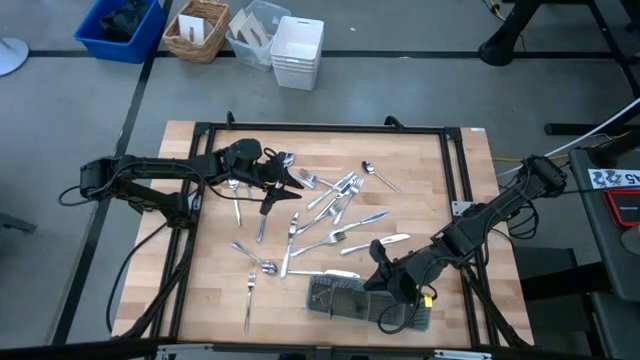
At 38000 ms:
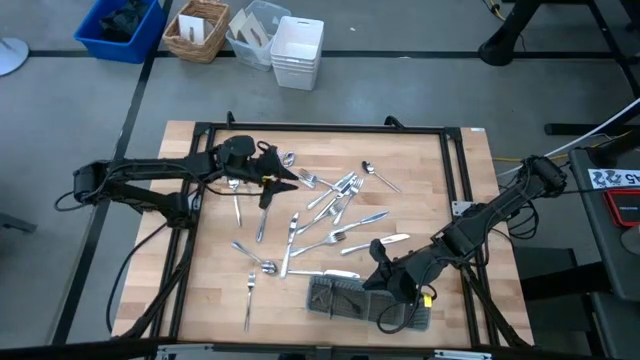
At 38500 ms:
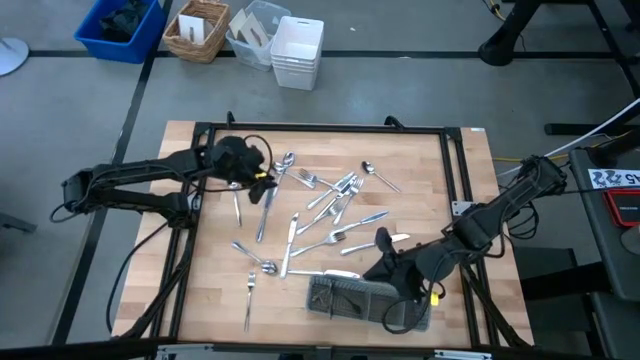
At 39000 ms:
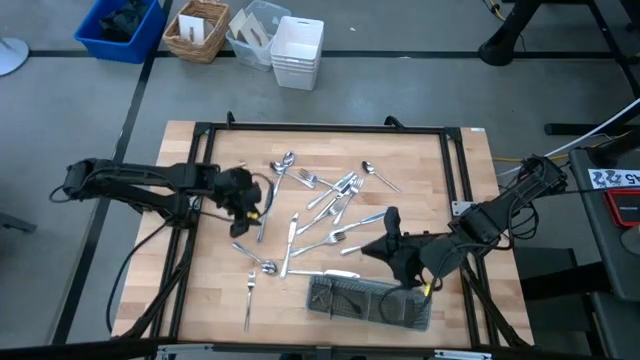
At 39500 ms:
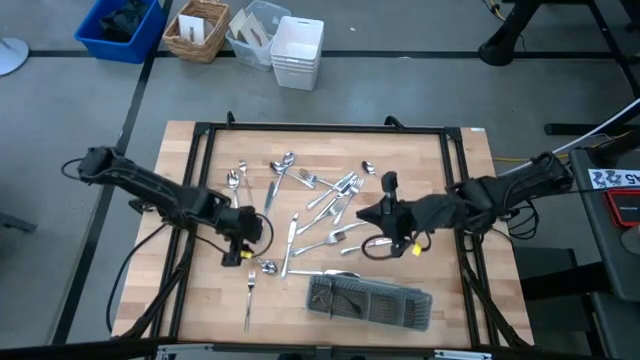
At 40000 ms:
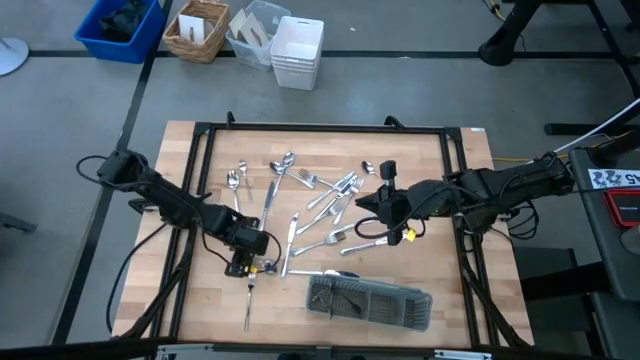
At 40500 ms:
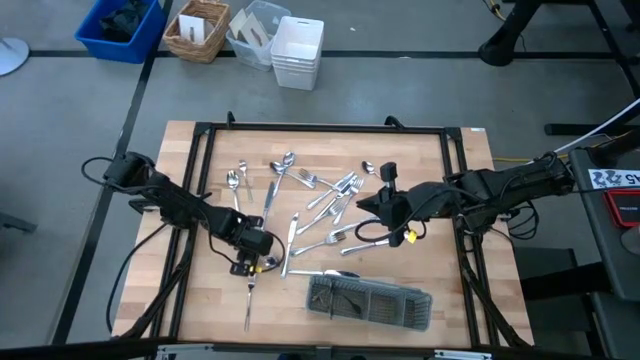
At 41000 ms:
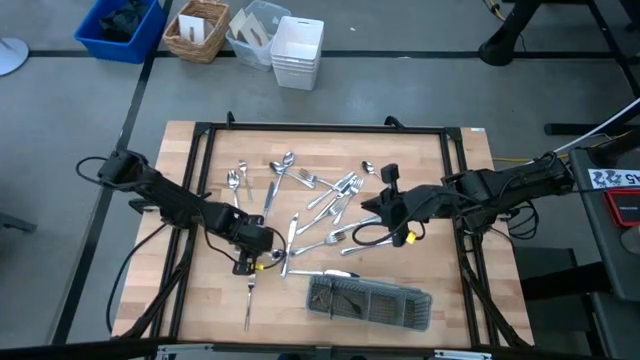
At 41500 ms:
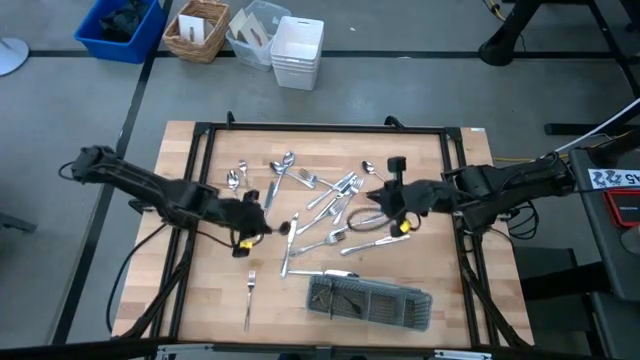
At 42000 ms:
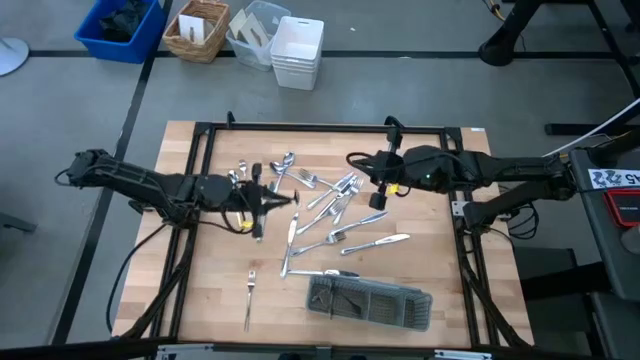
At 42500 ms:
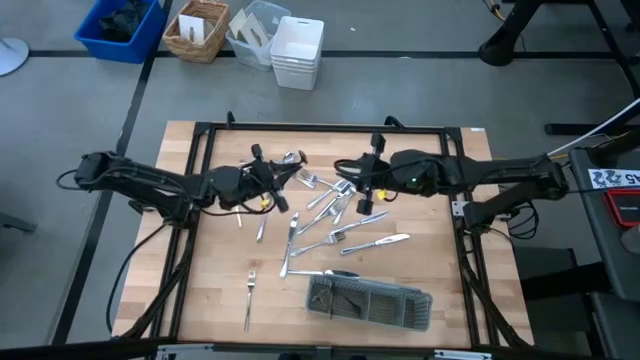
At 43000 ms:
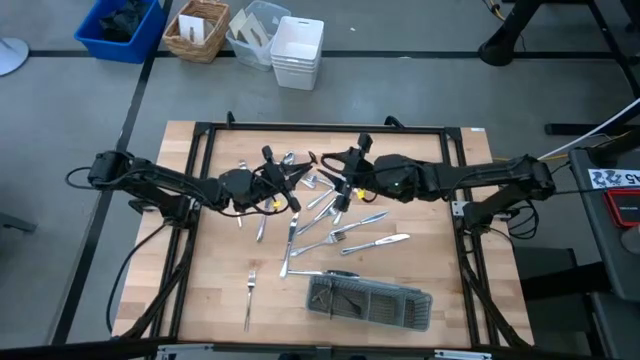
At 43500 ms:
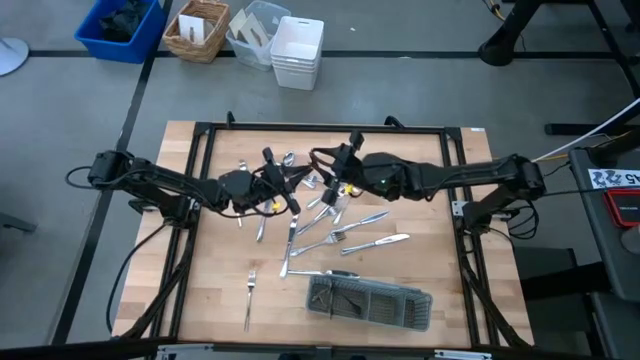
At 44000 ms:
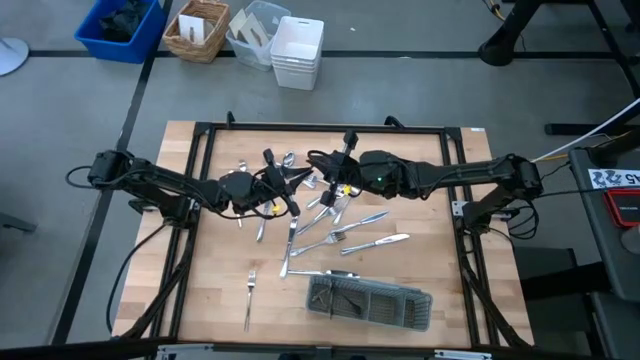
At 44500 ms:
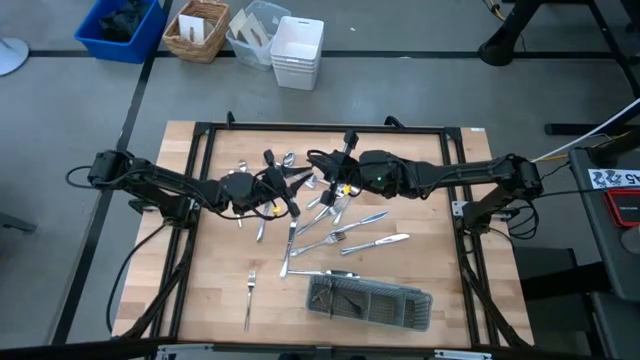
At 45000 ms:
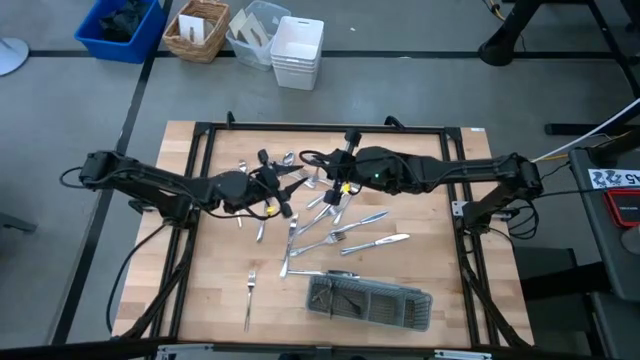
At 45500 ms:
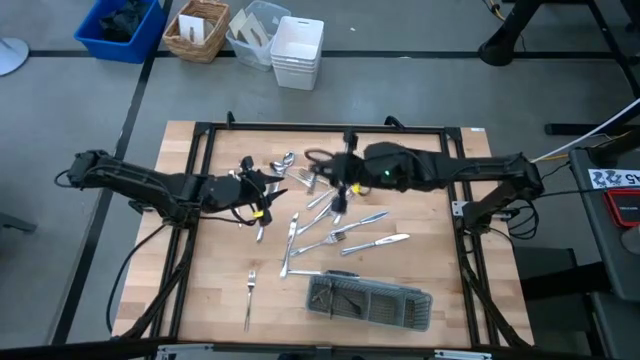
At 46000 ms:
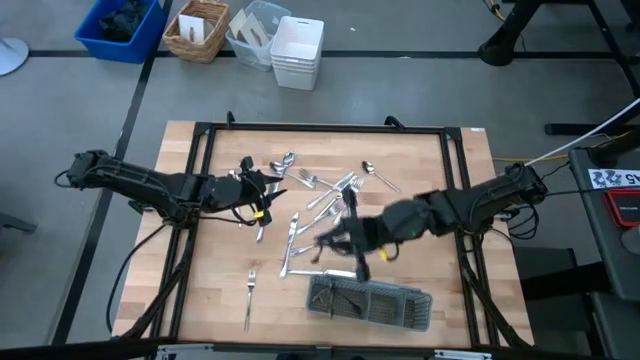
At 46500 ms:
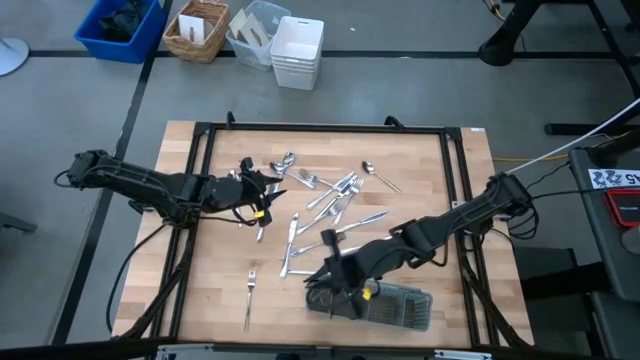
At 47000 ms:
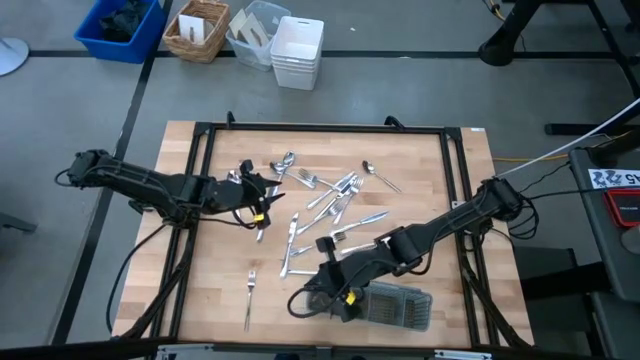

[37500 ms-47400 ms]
Task: Sort silverware
Put the spoon into the gray silverware rack

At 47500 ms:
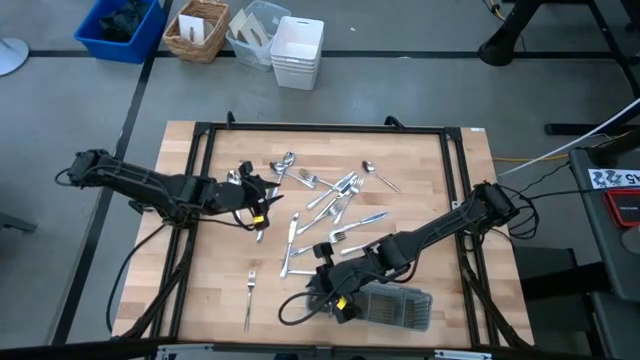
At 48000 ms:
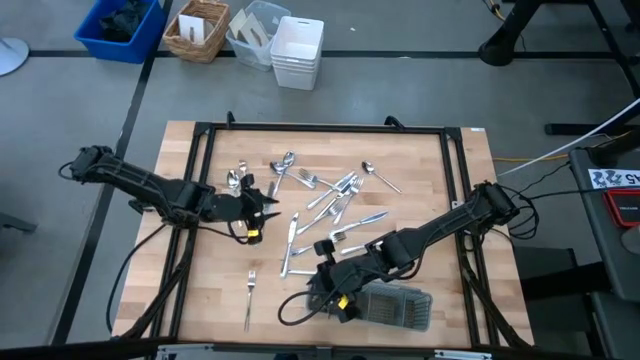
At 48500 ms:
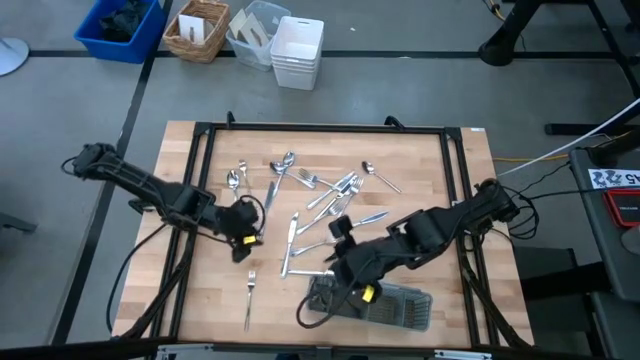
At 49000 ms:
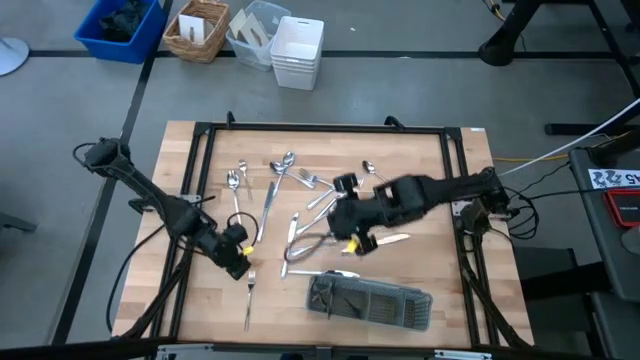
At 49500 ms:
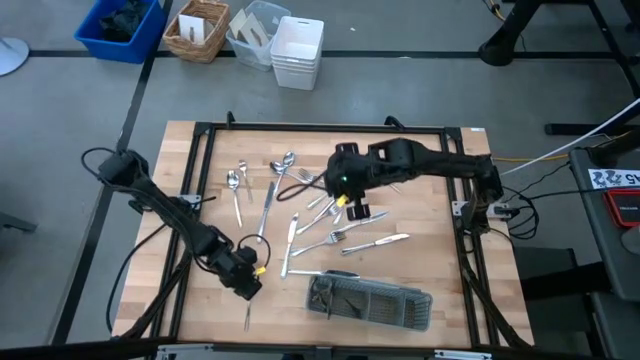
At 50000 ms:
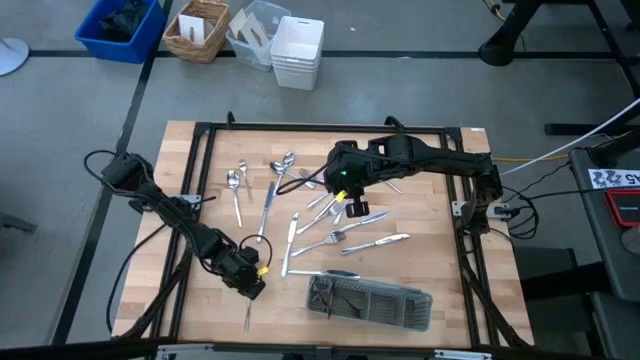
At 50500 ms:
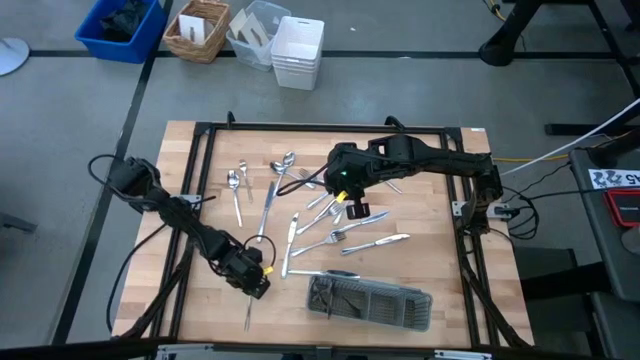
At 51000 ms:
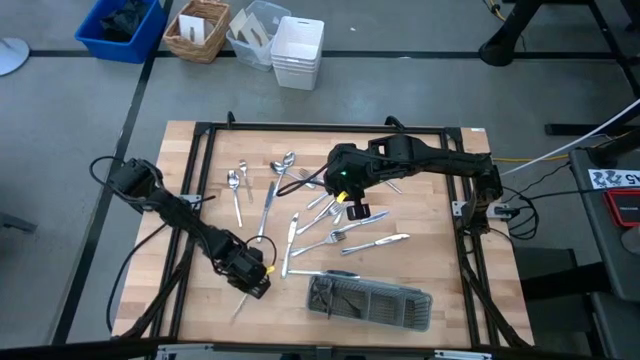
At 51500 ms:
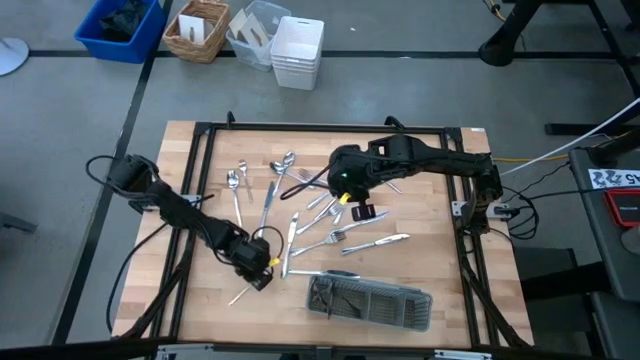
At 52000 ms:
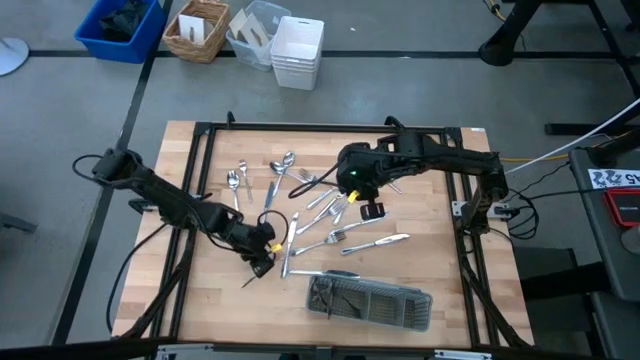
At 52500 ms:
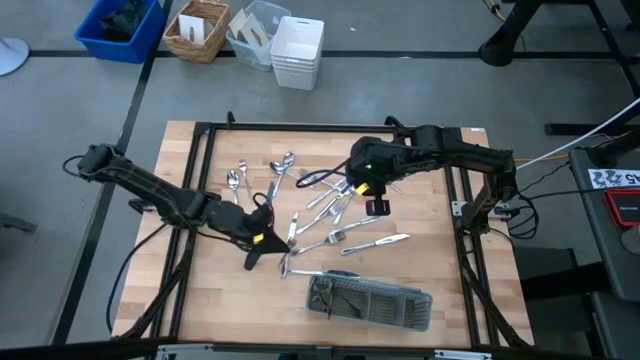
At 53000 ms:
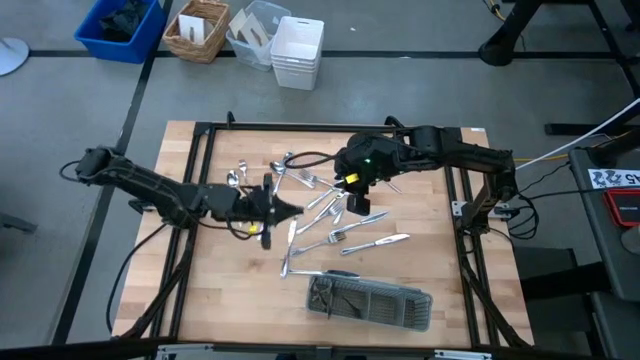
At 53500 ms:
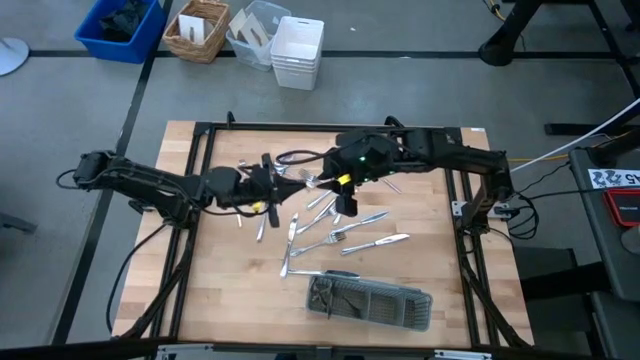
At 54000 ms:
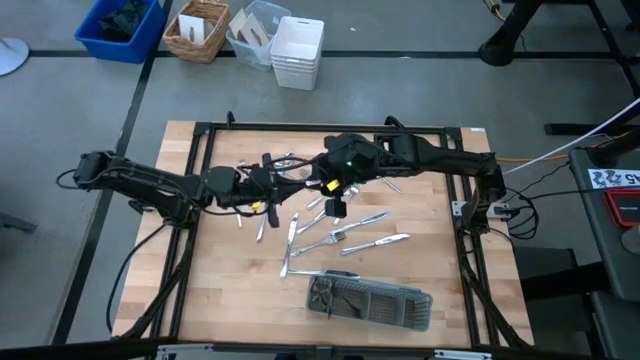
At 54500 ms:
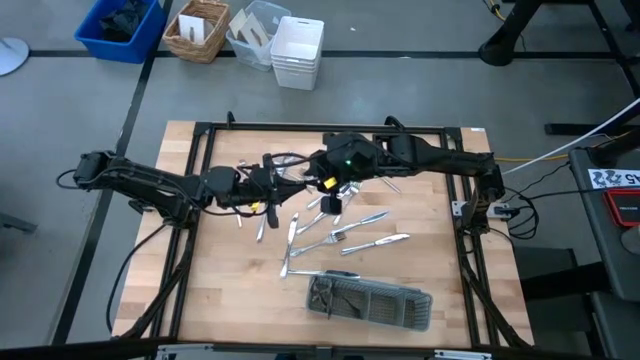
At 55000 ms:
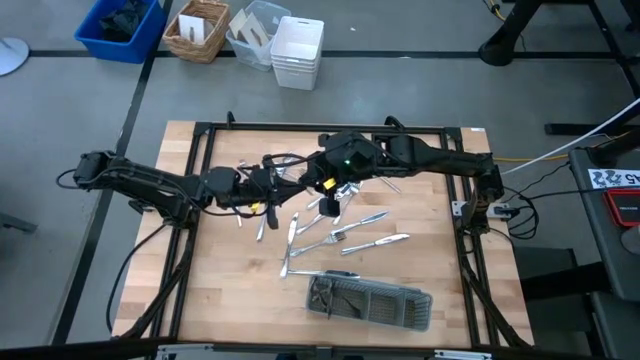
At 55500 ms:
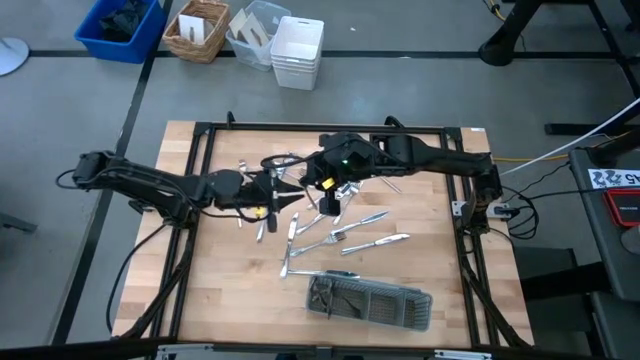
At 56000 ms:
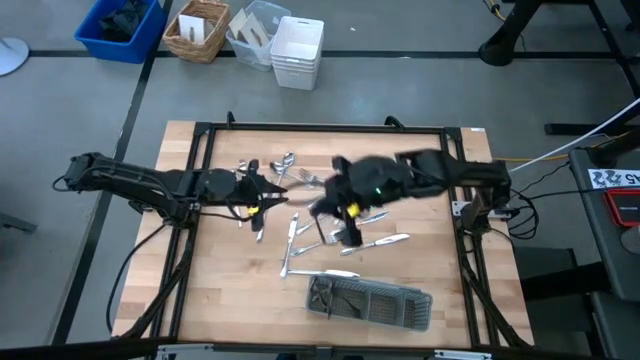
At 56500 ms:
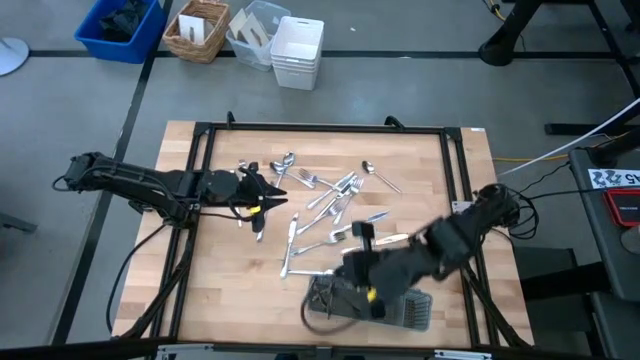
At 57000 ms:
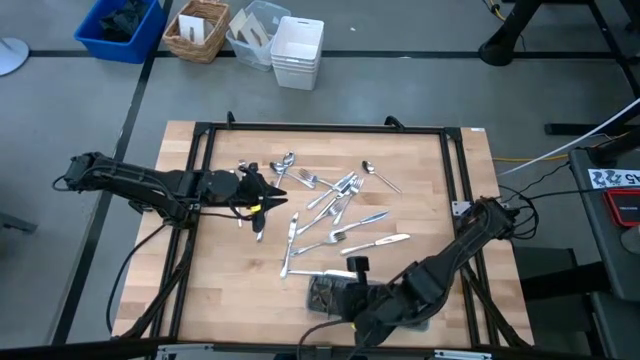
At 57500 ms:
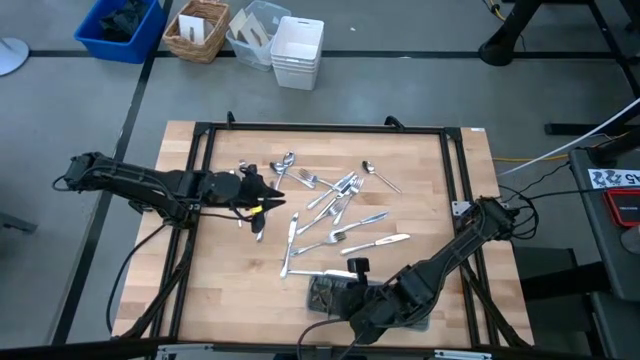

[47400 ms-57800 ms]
Put the fork into the gray silverware rack

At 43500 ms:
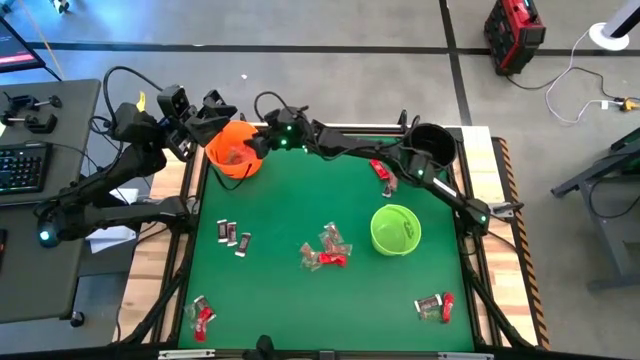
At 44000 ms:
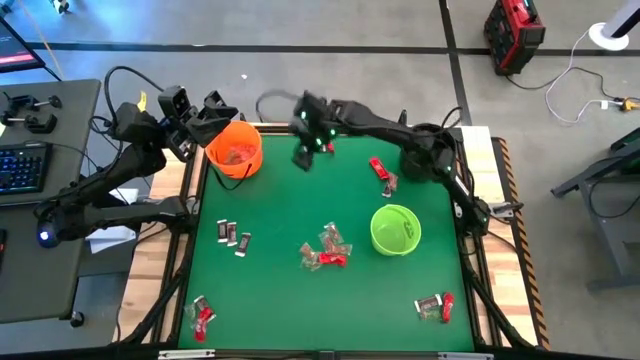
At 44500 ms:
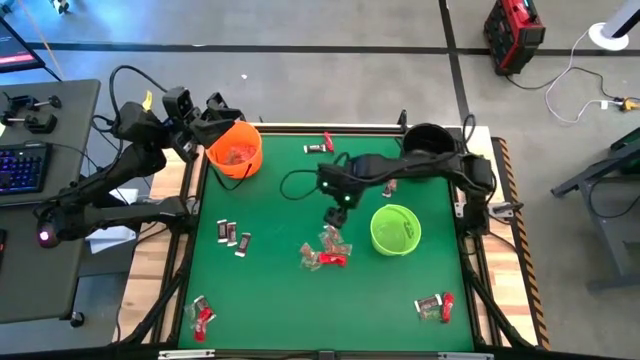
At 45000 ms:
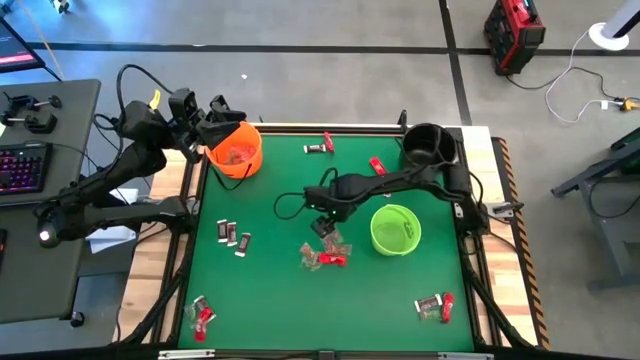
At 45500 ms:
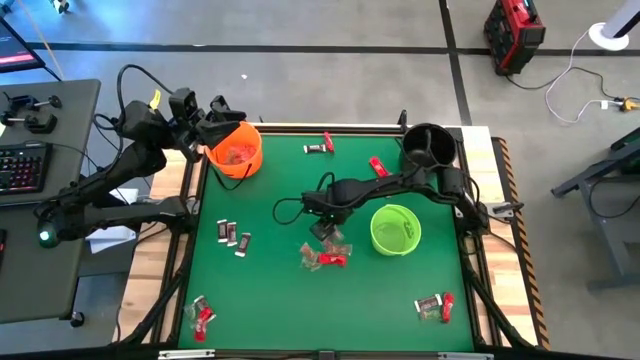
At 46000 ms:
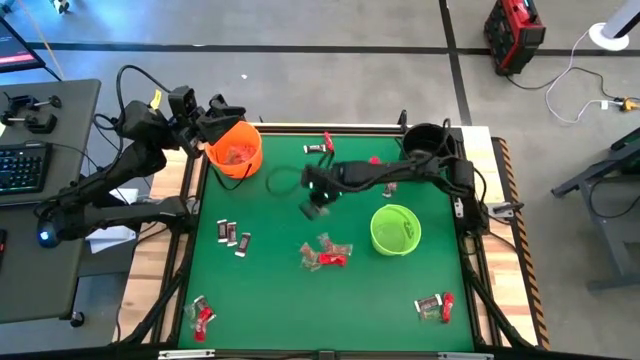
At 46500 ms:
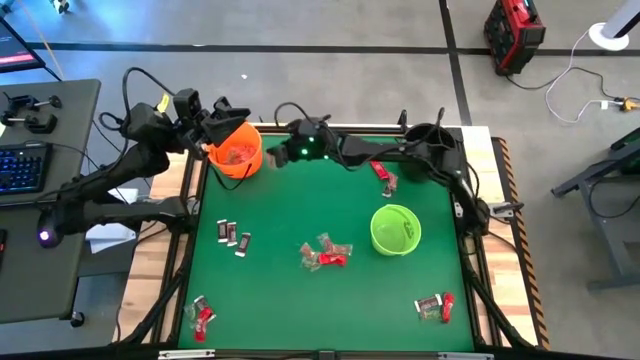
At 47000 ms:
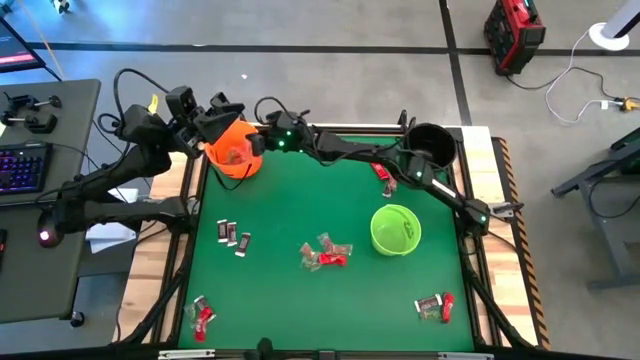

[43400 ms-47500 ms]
Task: Sort candy by brand, put in halloween buckets
Put the orange gummy into the orange bucket
